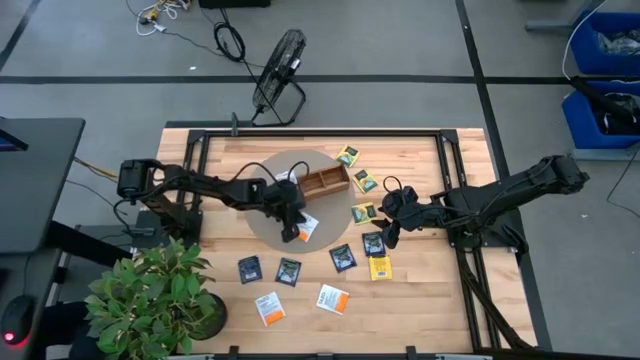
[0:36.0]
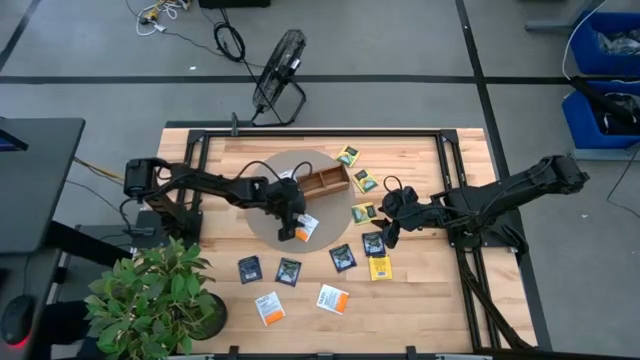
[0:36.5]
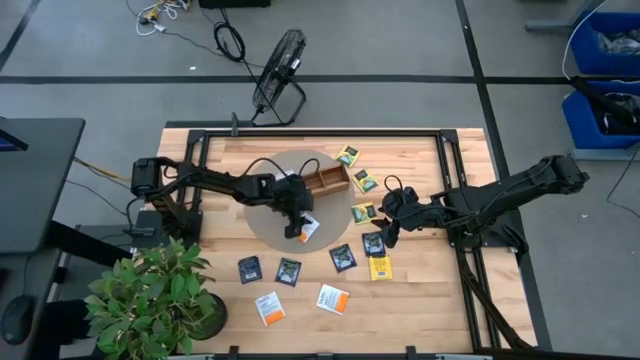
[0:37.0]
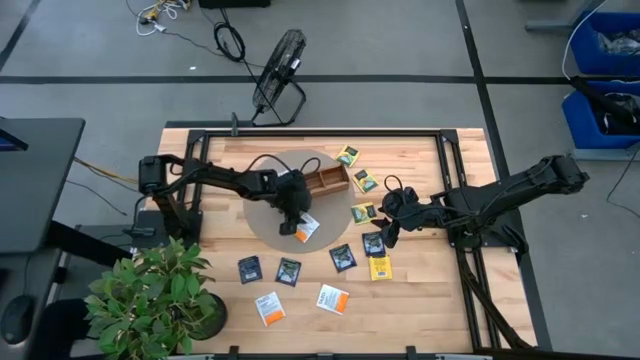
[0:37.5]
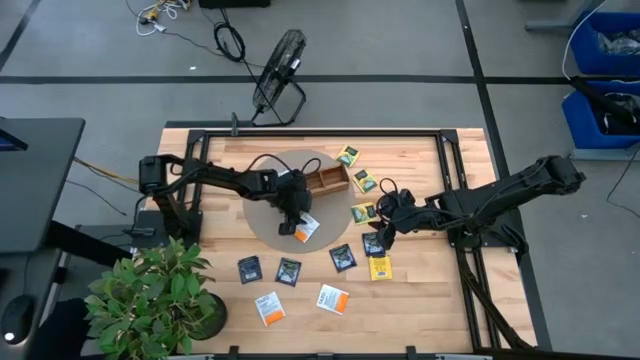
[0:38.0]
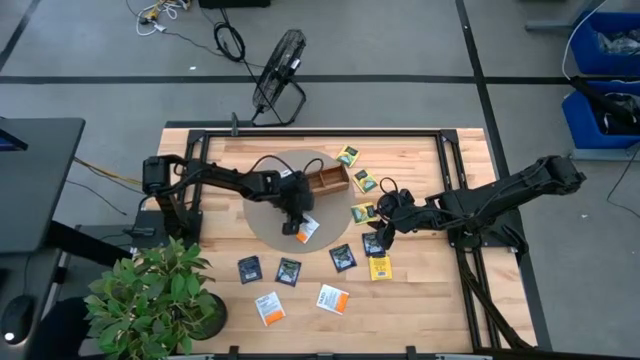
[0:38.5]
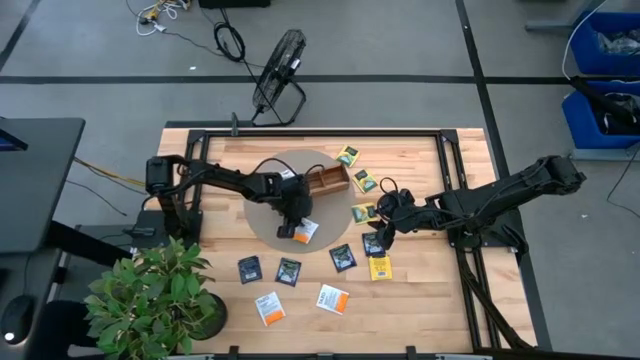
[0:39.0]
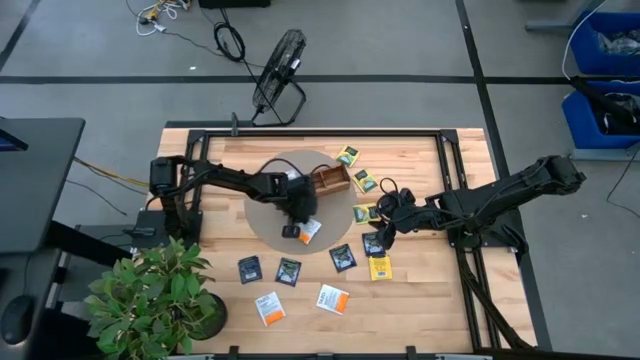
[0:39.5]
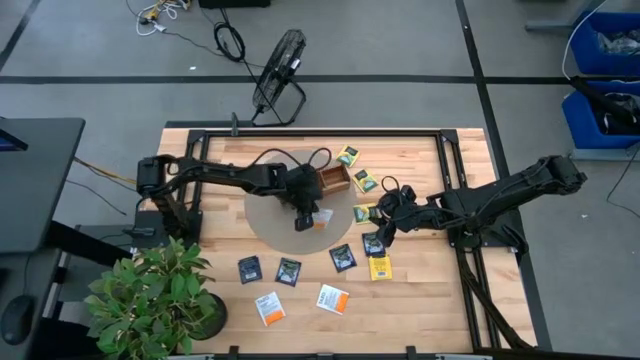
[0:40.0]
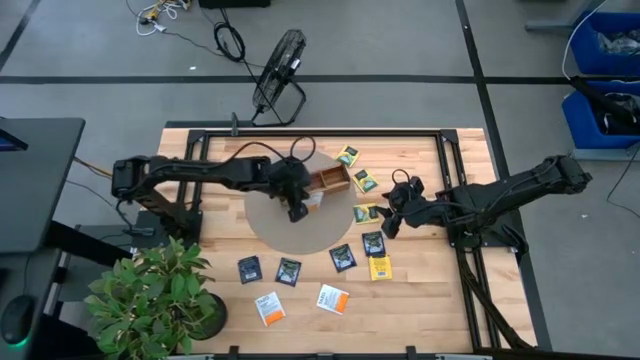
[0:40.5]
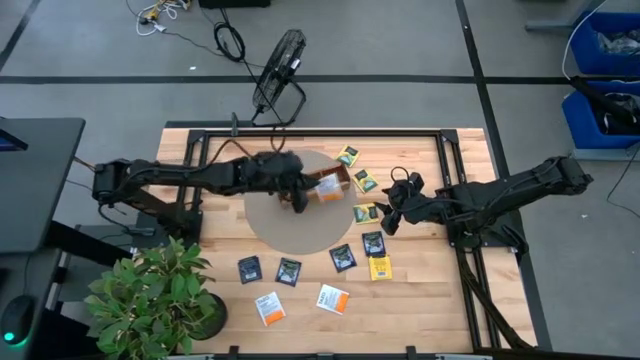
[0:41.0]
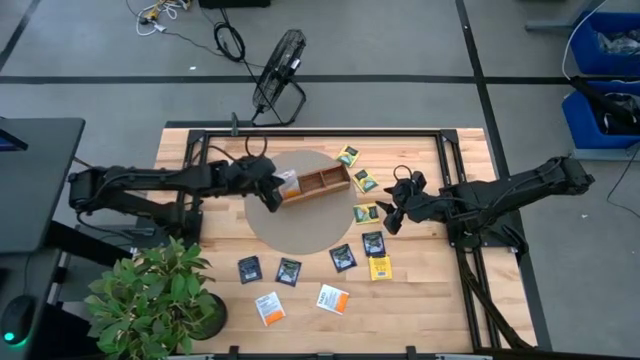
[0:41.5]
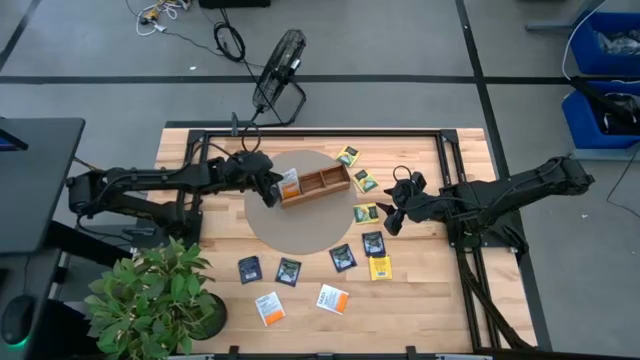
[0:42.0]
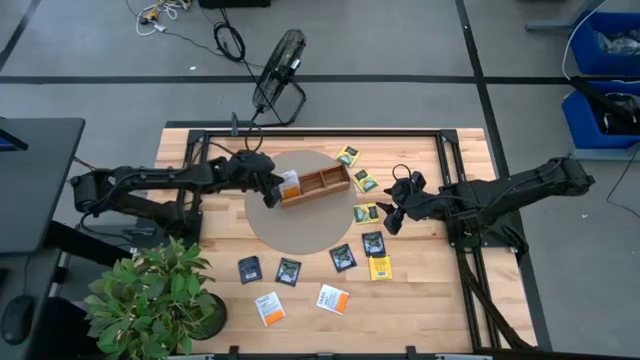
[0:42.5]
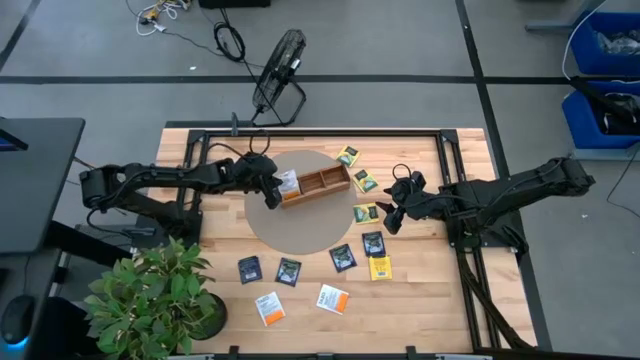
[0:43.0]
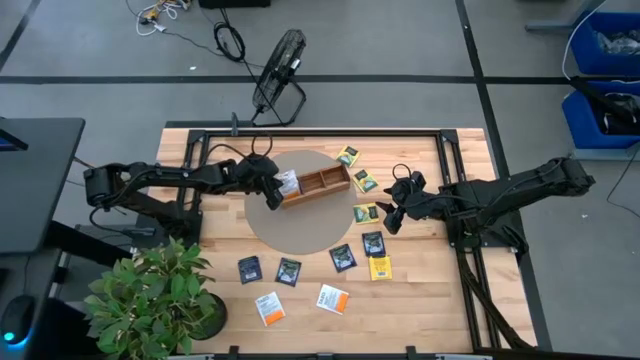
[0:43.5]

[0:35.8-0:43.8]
Task: Pick & Place Tea
Put the white tea bag into the left section of the wooden organizer

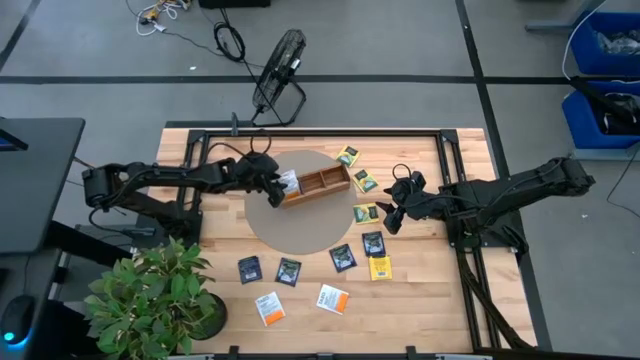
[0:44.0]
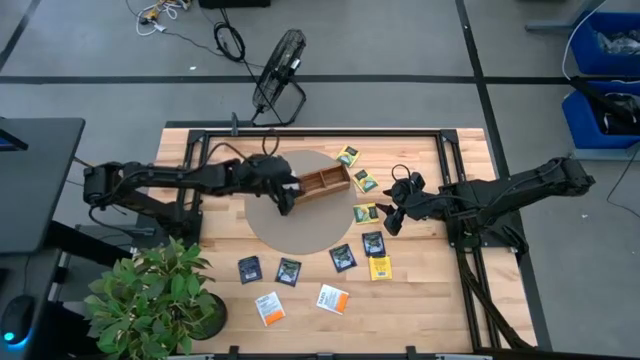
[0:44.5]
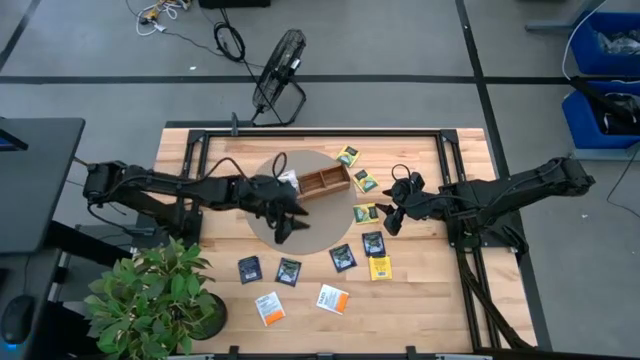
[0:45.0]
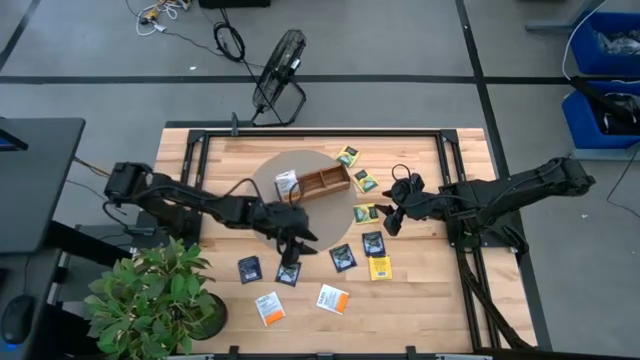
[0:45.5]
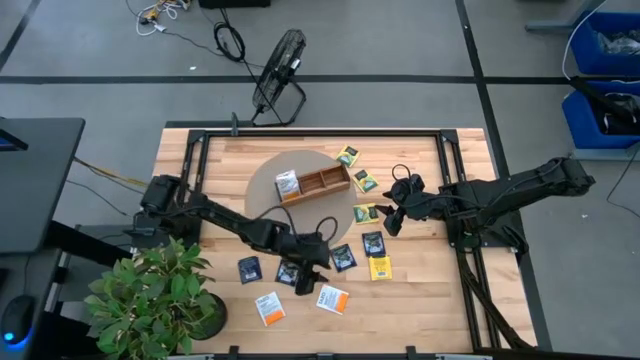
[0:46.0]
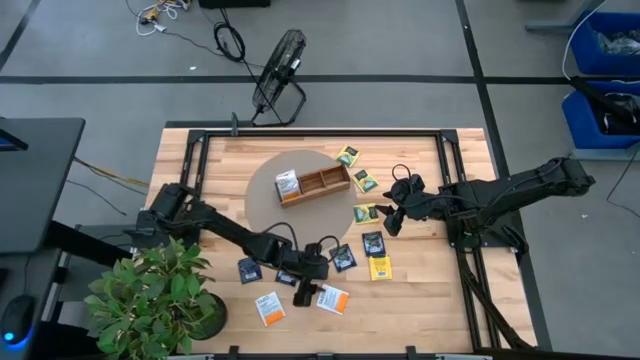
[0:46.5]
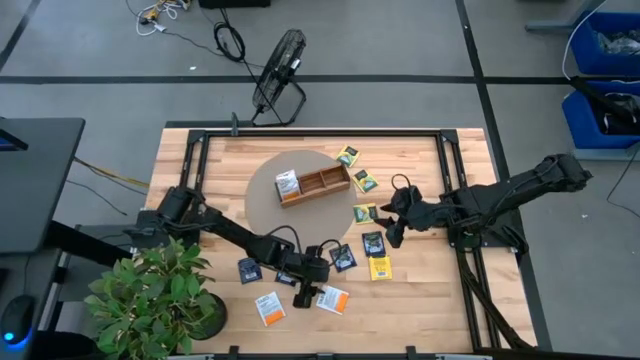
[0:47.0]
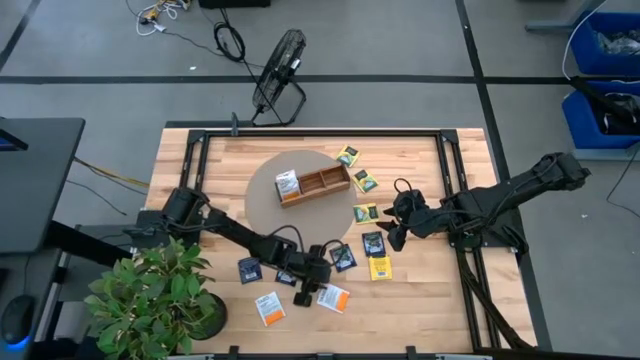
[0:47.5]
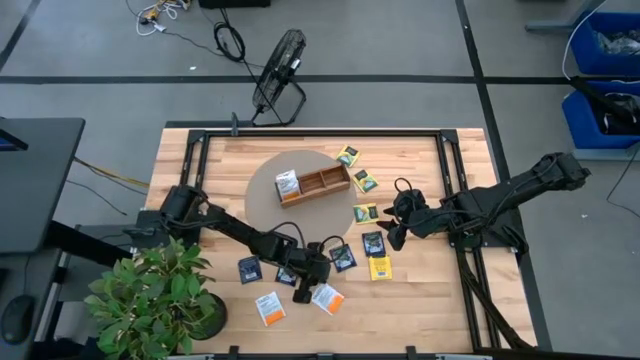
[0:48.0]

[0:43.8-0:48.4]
Put the white tea bag into the left section of the wooden organizer

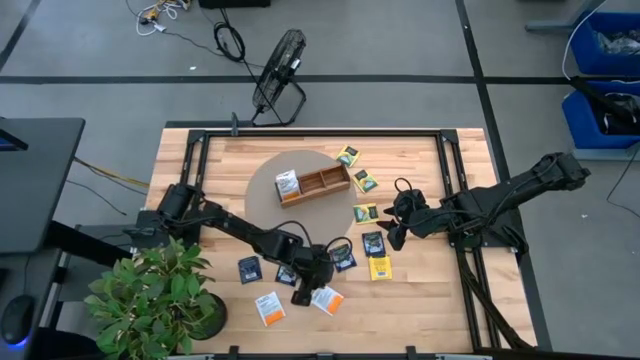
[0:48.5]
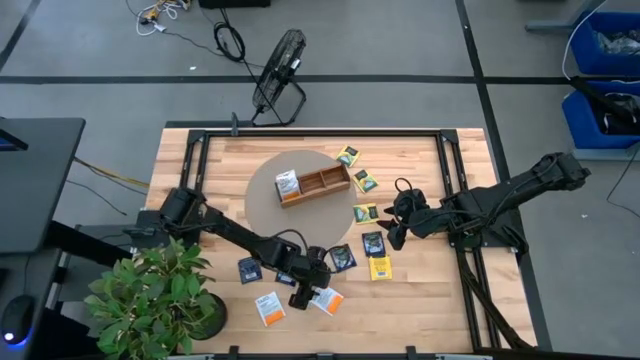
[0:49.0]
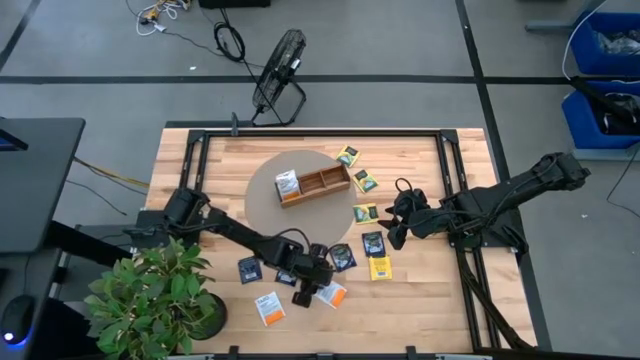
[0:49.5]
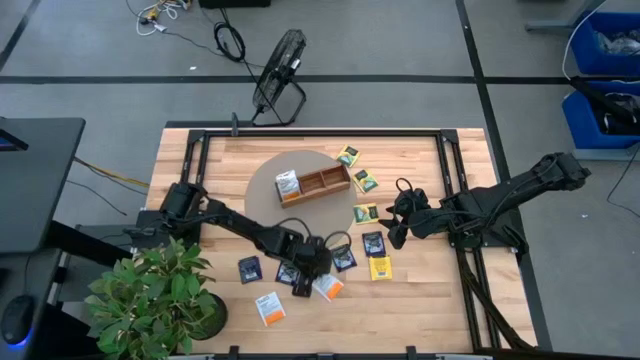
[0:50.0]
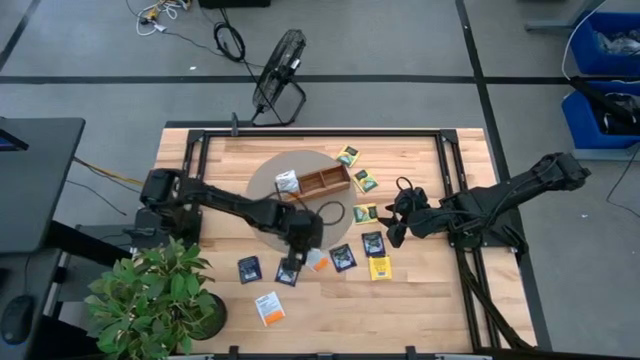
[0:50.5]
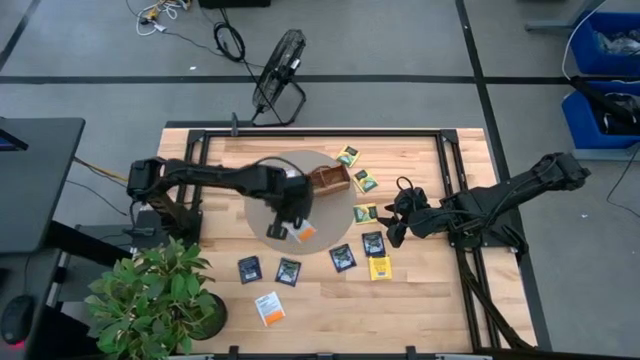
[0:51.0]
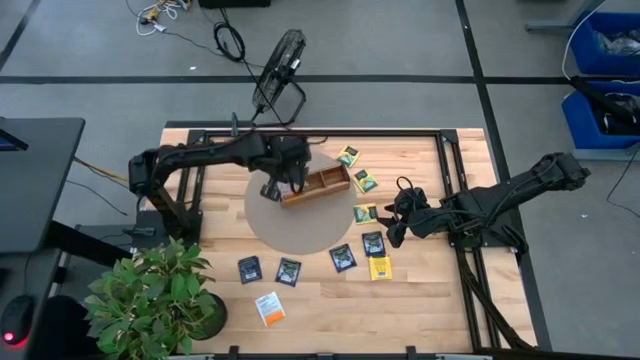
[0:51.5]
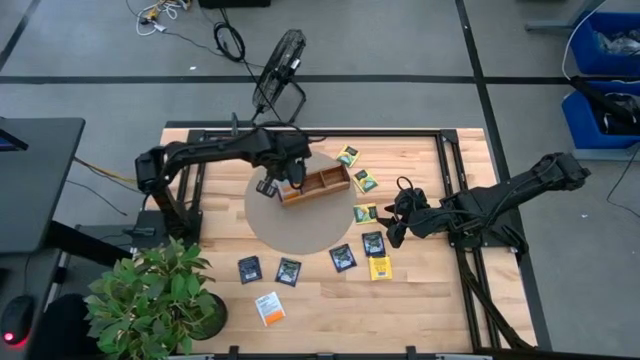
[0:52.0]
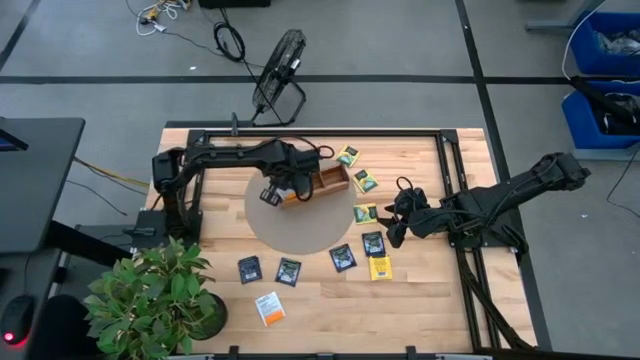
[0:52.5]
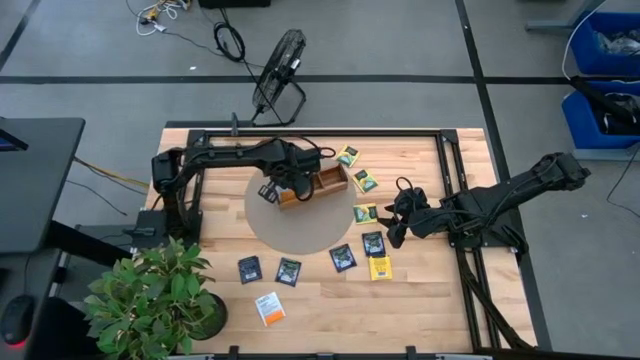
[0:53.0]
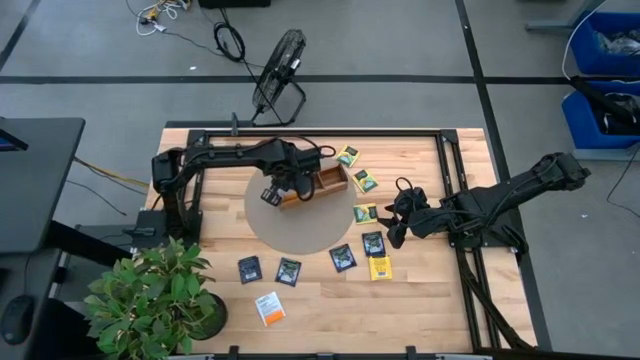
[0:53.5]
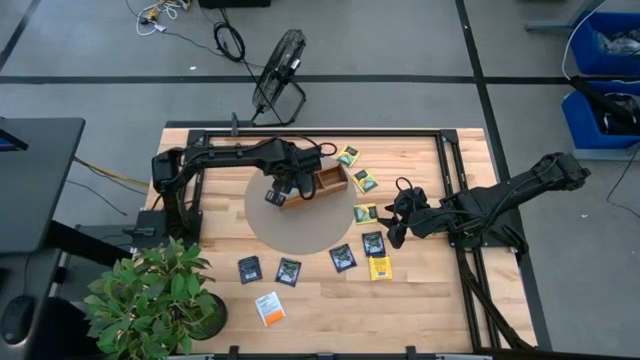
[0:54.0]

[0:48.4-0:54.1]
Put the white tea bag into the left section of the wooden organizer

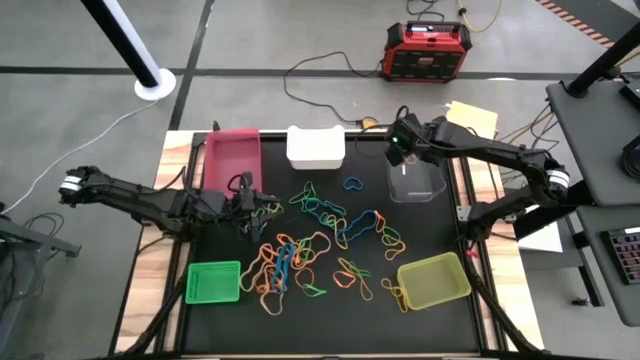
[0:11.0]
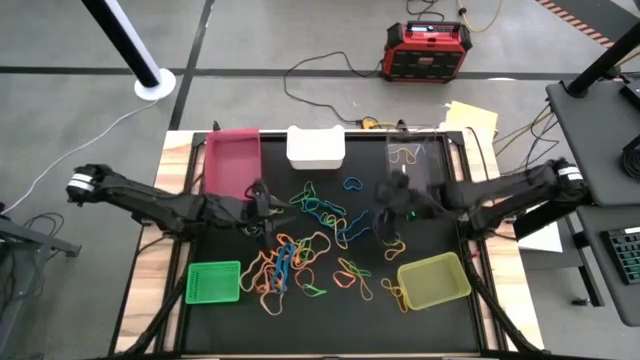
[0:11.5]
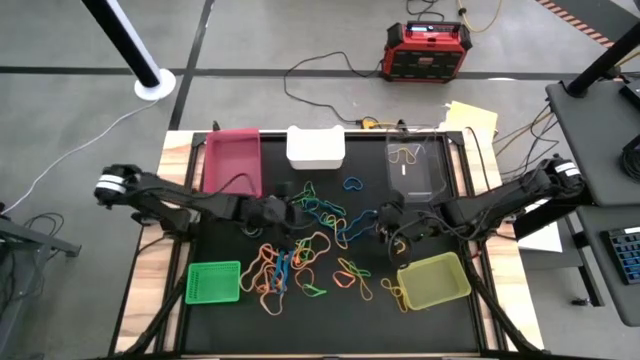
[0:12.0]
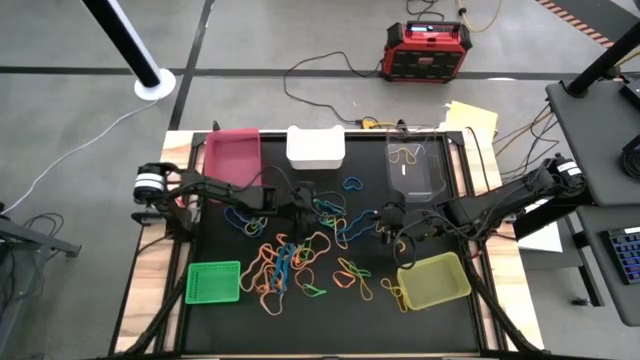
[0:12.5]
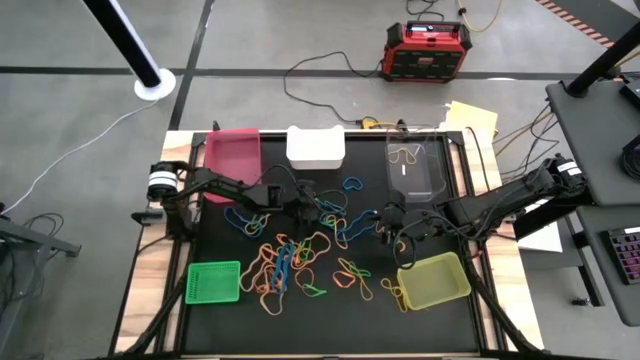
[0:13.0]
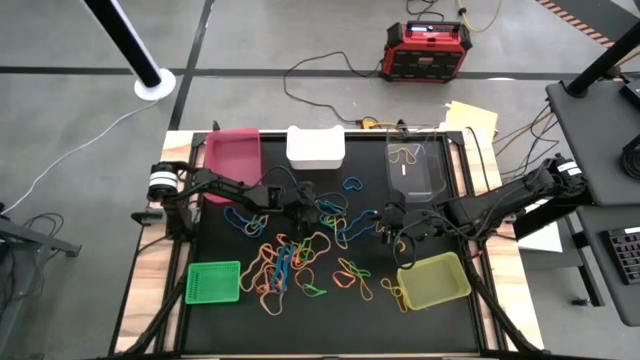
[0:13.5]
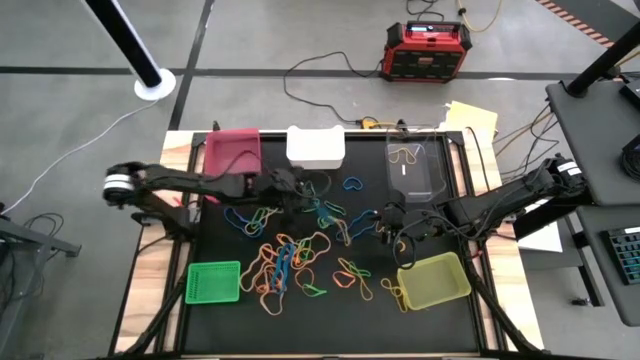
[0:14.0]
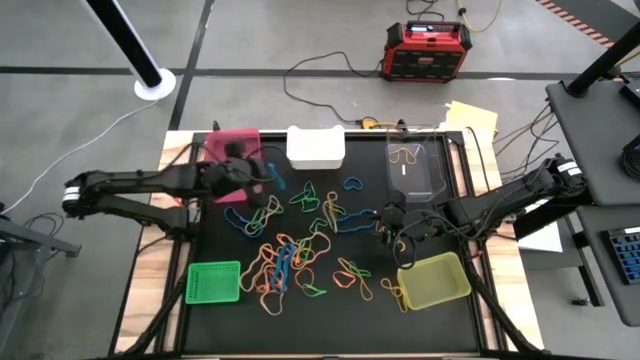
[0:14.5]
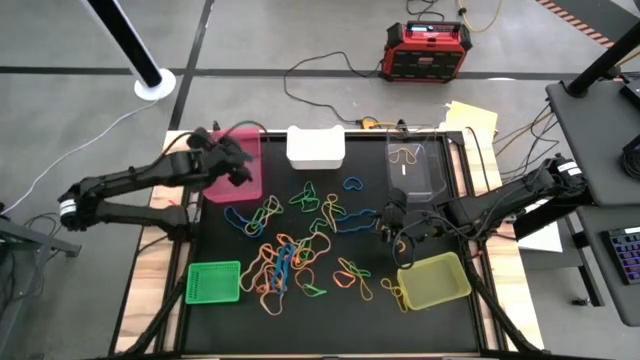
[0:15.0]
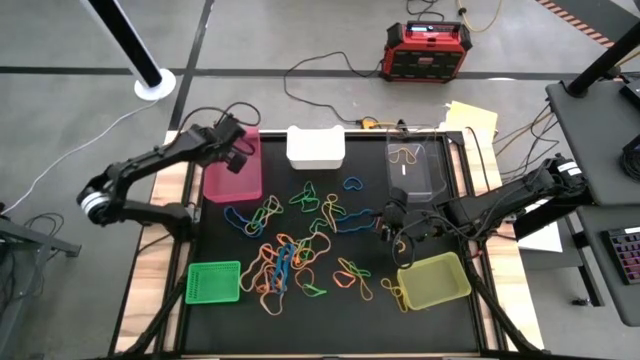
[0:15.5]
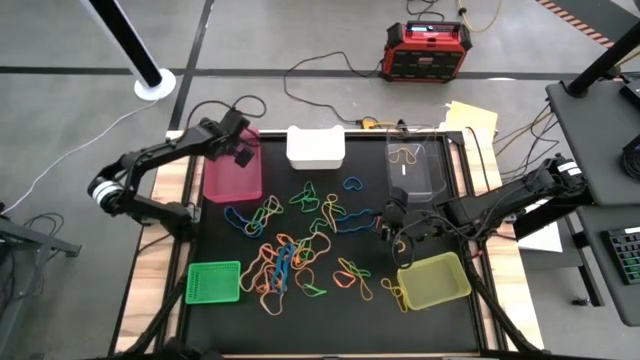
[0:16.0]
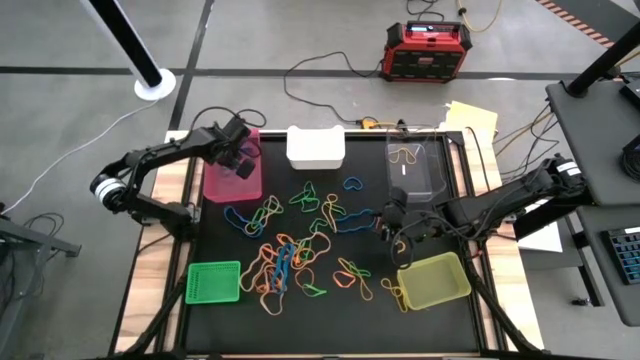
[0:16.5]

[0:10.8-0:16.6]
Task: Sort rubber bands into baskets
Put the blue rubber band into the pink bin
